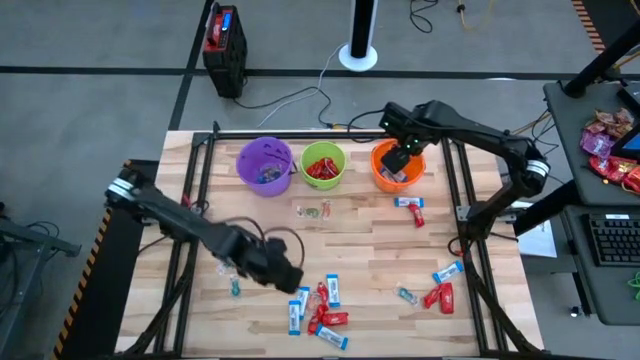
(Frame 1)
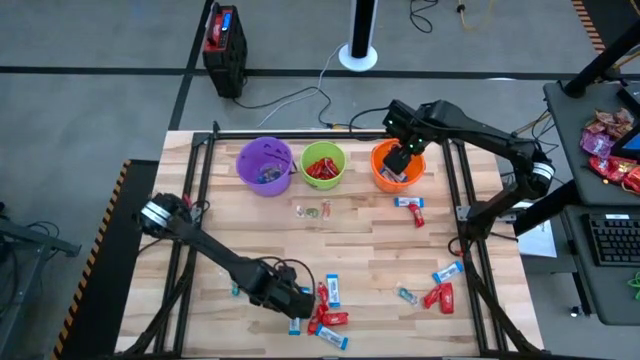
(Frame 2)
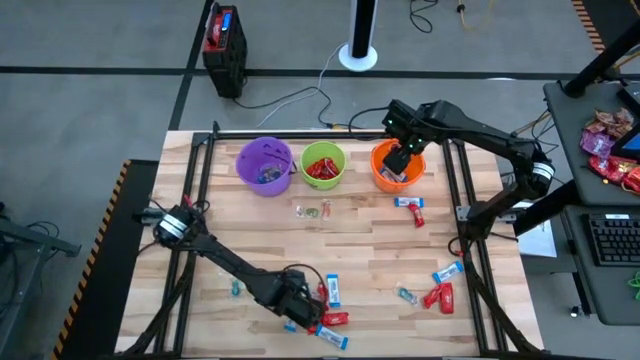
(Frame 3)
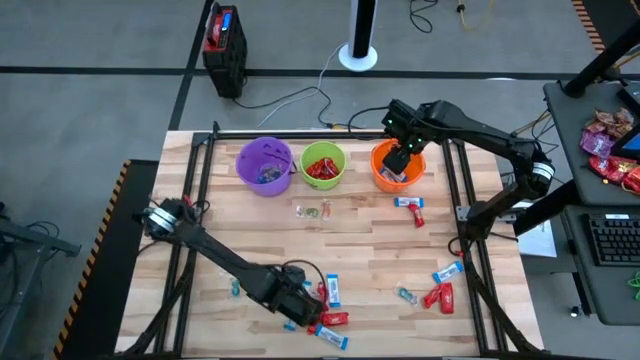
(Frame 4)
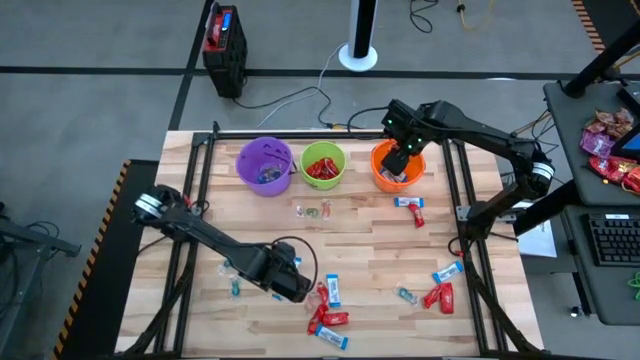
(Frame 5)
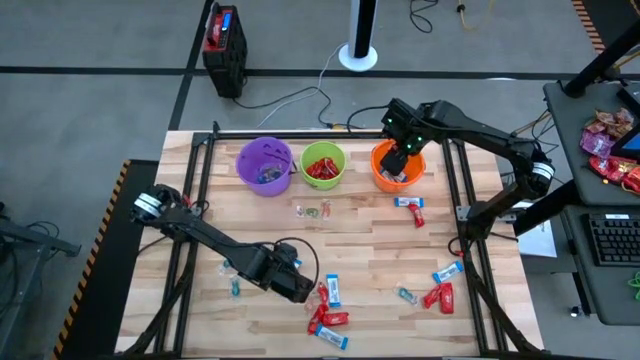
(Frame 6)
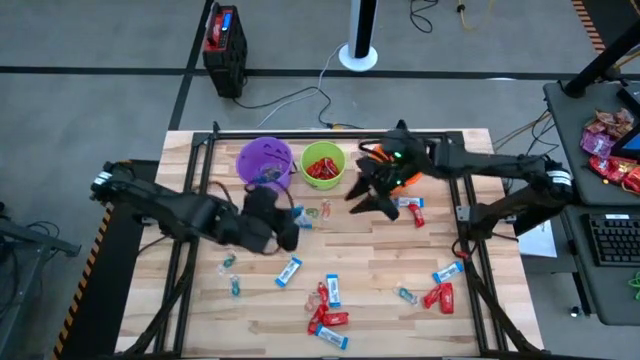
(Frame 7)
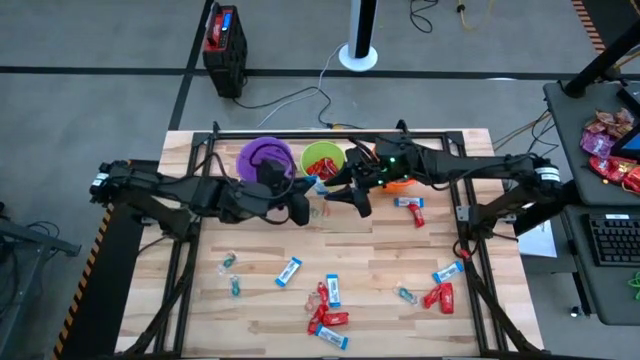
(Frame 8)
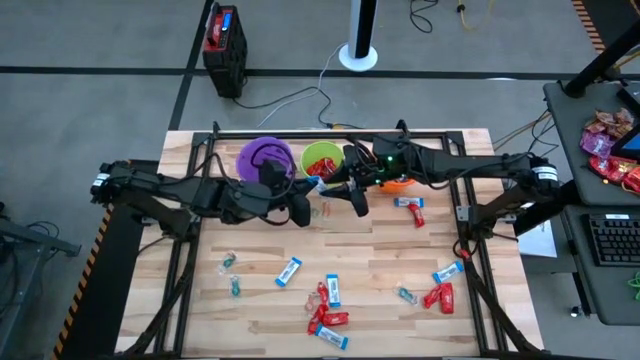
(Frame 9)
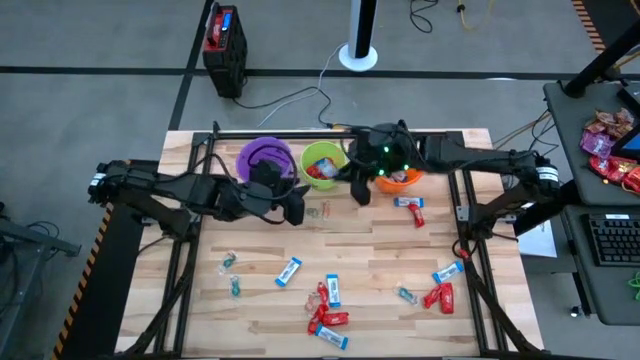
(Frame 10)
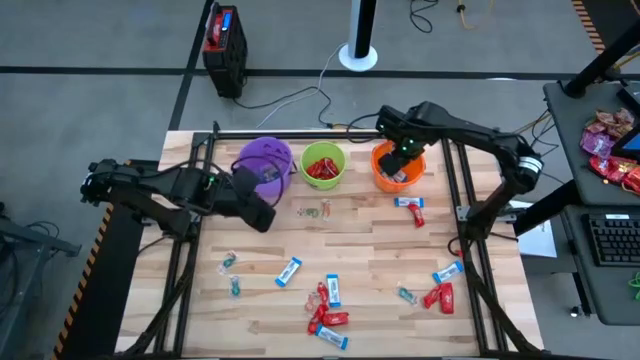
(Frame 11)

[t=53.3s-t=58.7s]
Task: Sort candy by brand, put in halloween buckets
Put the white chocolate bar into the orange bucket

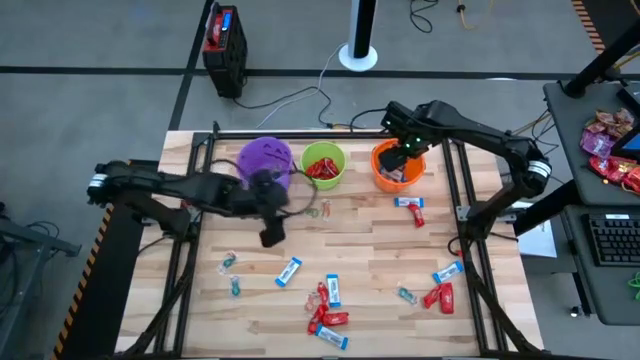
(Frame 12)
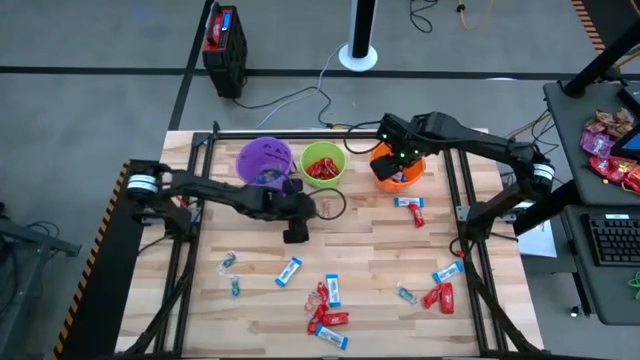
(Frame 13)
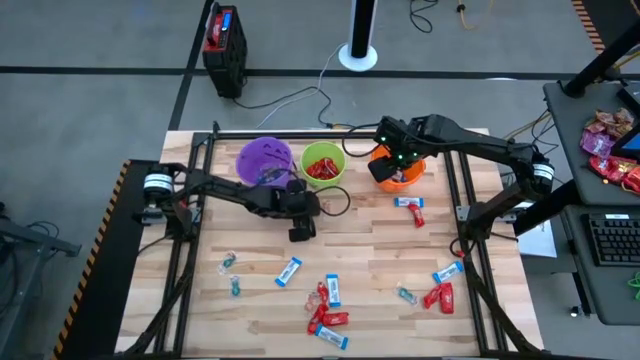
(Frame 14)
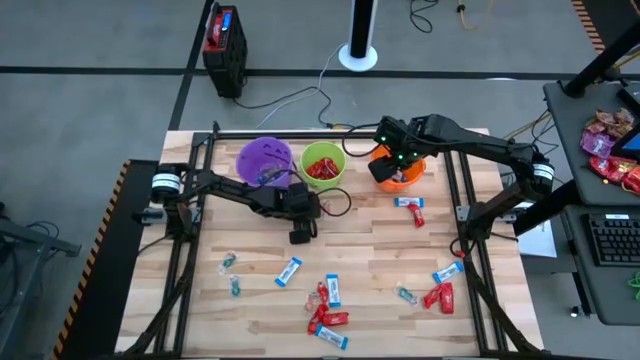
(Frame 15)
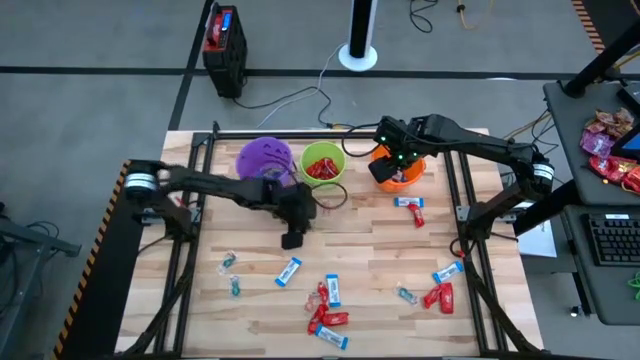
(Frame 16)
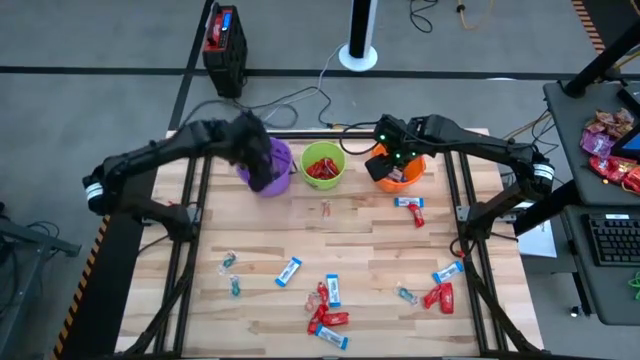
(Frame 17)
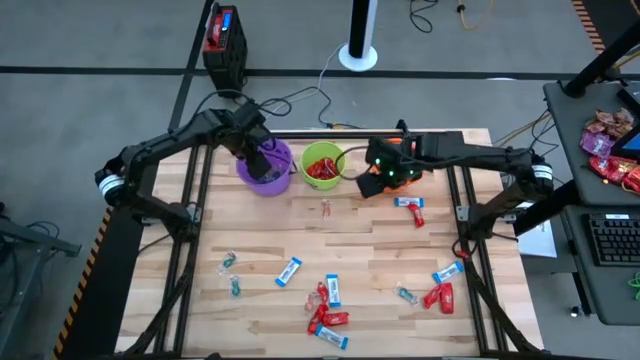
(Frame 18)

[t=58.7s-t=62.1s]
Put the green gummy candy into the purple bucket

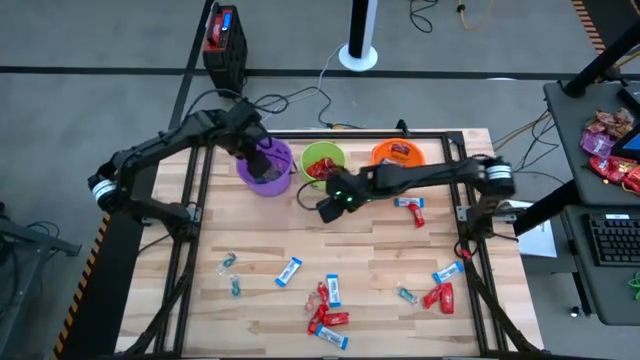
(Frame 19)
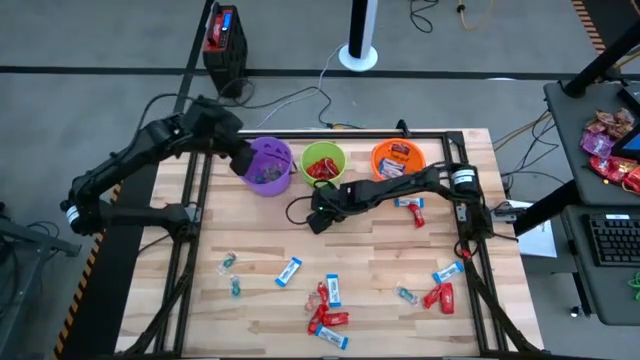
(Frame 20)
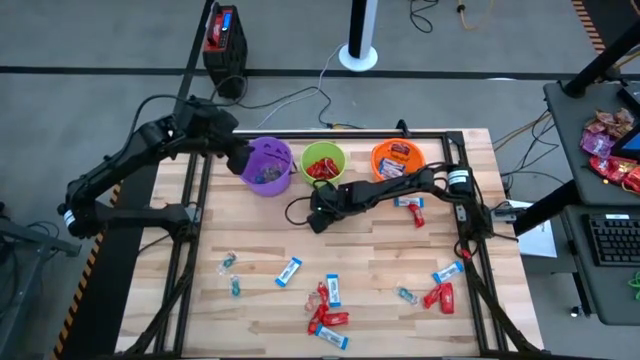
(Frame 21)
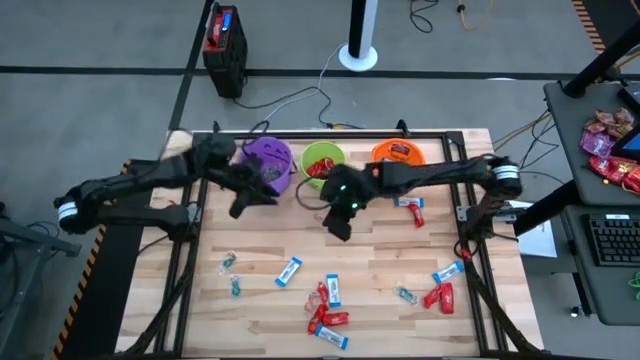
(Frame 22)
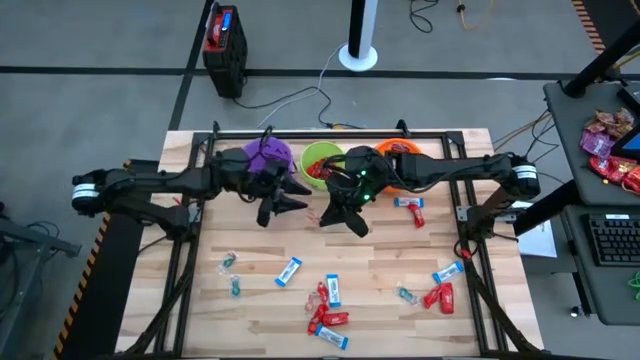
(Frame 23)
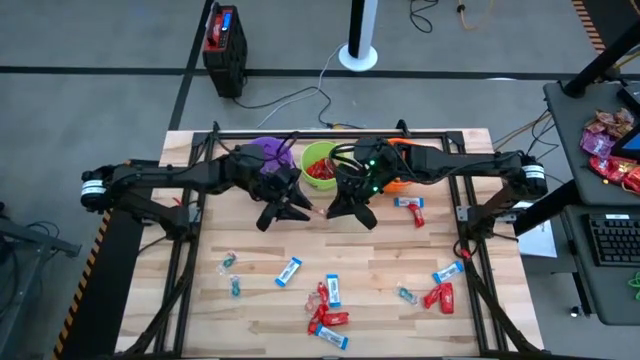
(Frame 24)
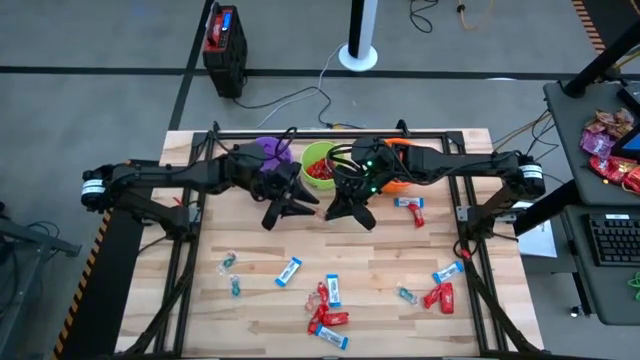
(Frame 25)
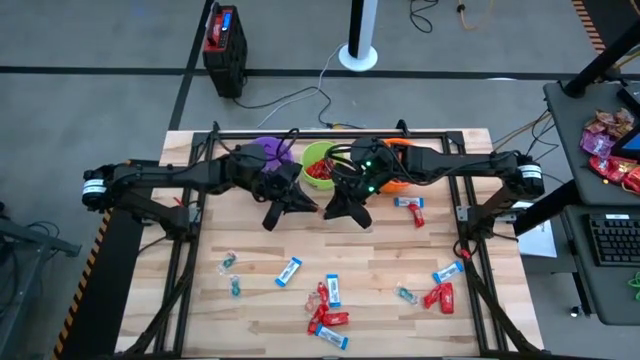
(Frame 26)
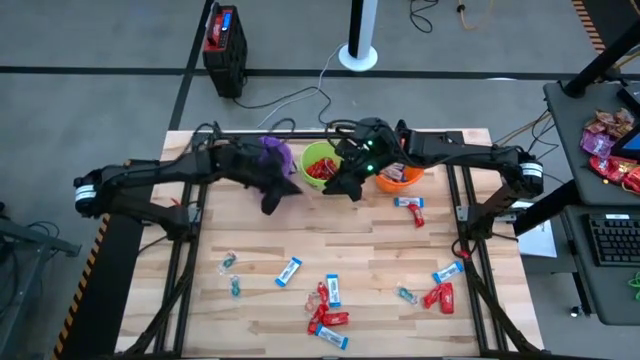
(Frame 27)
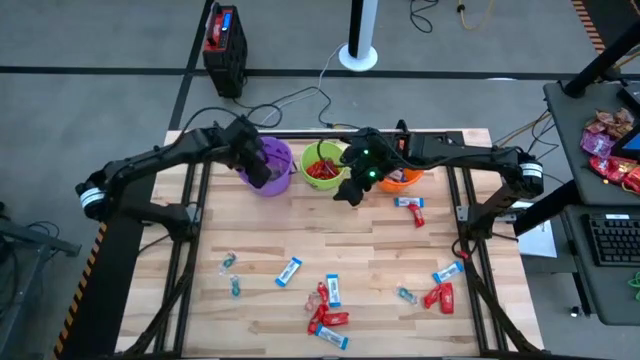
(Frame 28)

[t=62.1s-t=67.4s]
Put the orange gummy candy into the purple bucket

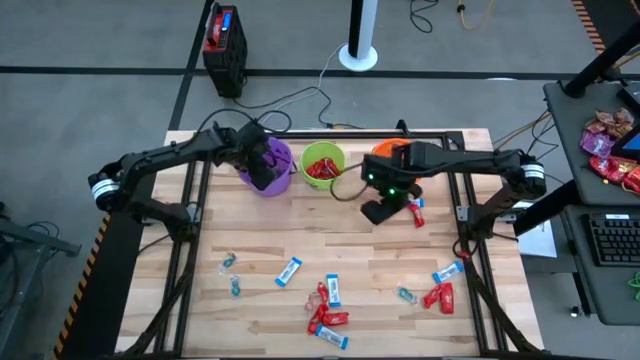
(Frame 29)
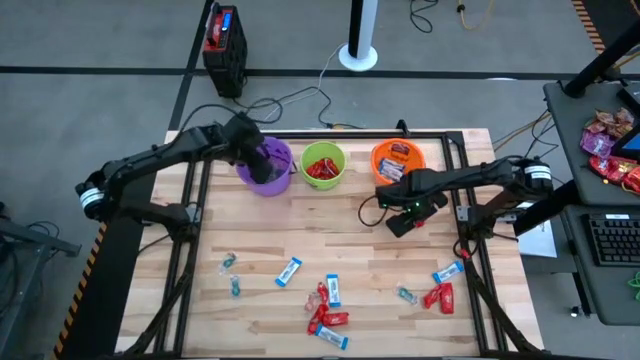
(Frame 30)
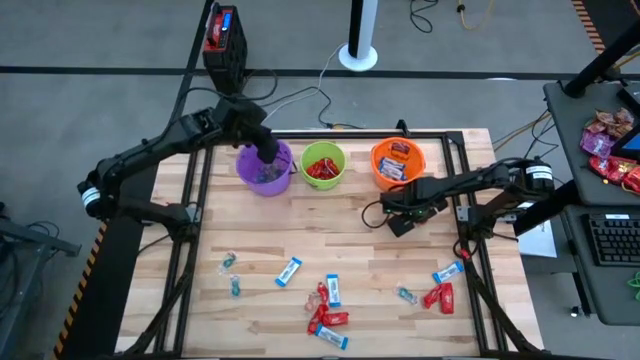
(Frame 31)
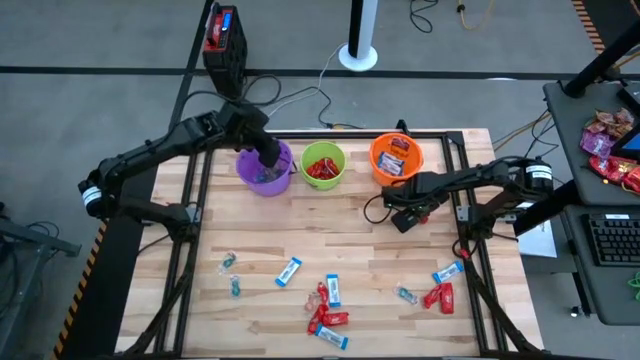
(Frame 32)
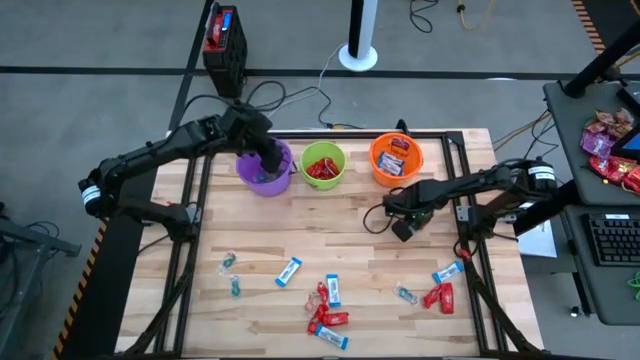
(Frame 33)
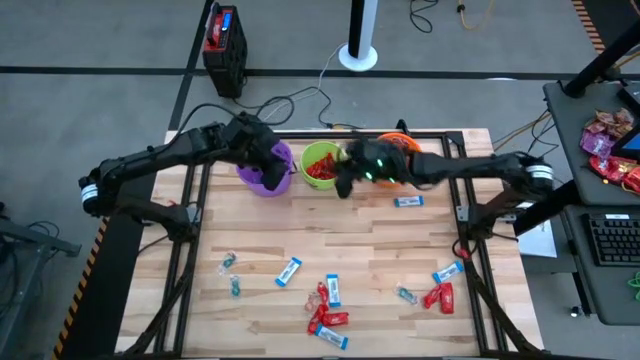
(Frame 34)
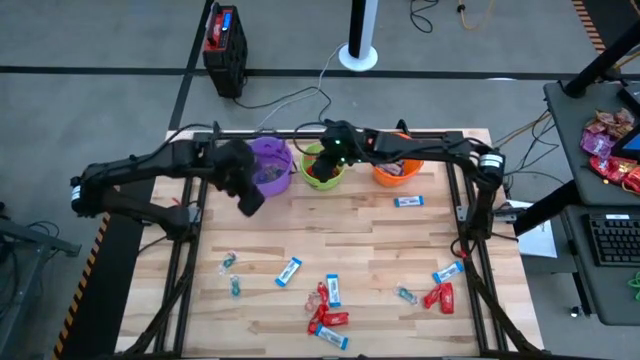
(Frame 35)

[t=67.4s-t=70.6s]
Put the red chocolate bar into the green bucket

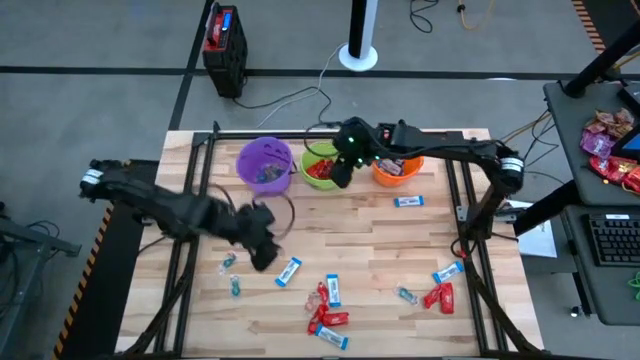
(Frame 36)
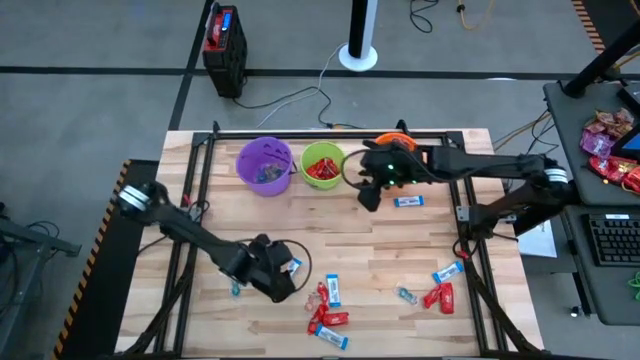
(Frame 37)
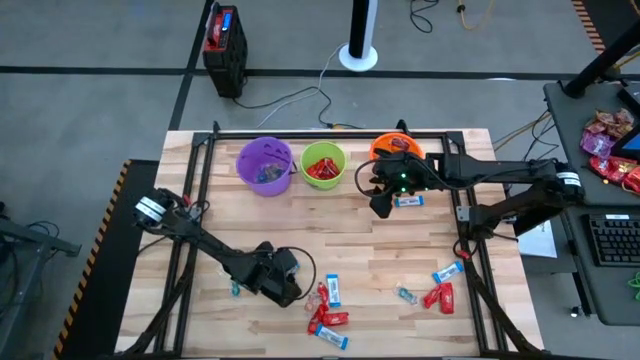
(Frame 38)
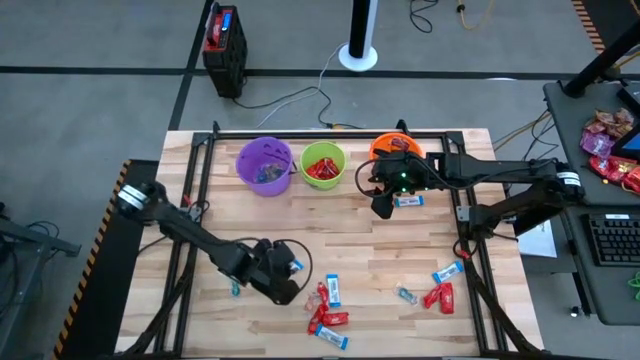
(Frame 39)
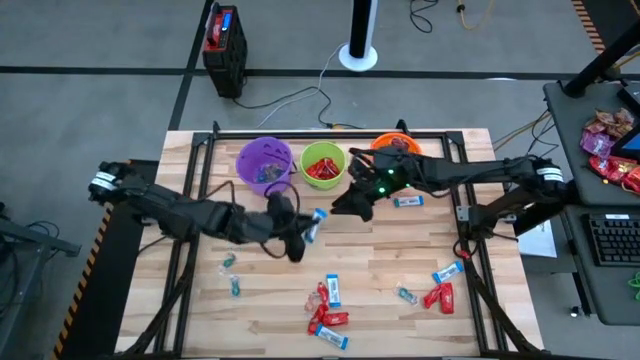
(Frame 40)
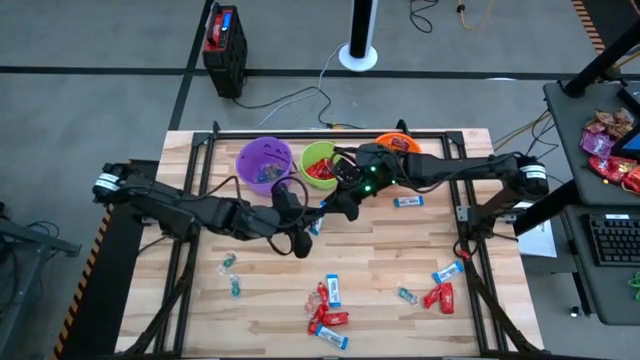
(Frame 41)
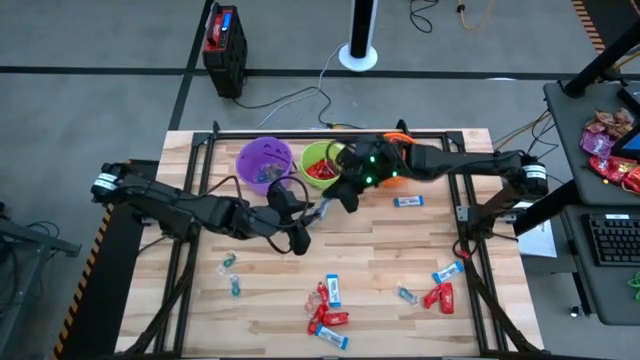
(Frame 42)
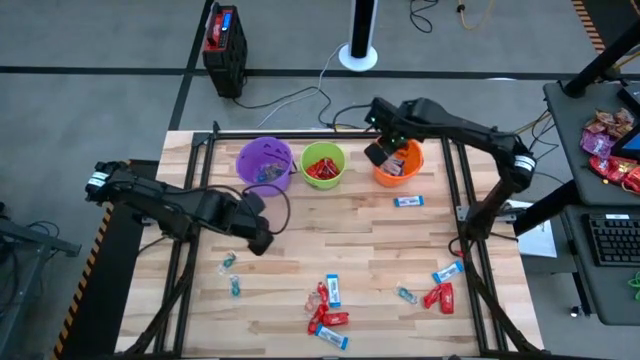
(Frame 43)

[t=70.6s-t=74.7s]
Put the white chocolate bar into the orange bucket

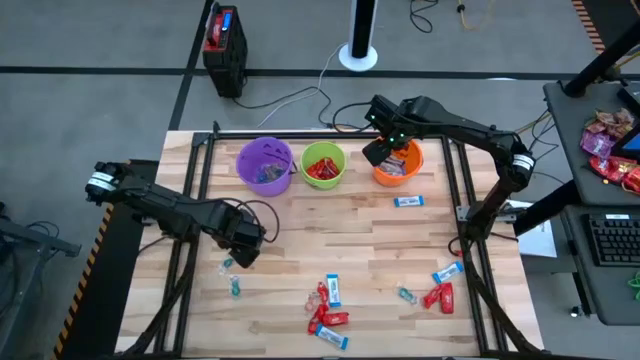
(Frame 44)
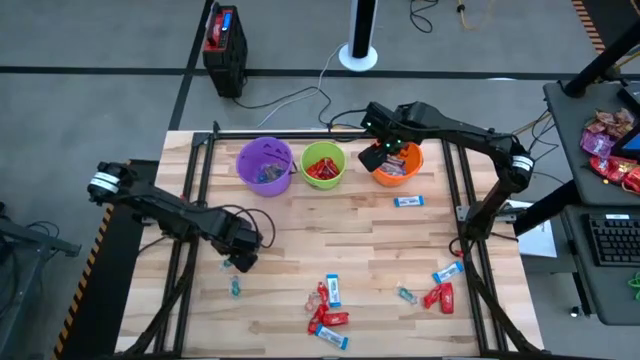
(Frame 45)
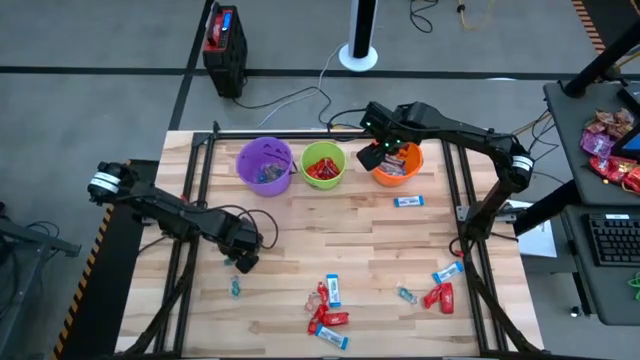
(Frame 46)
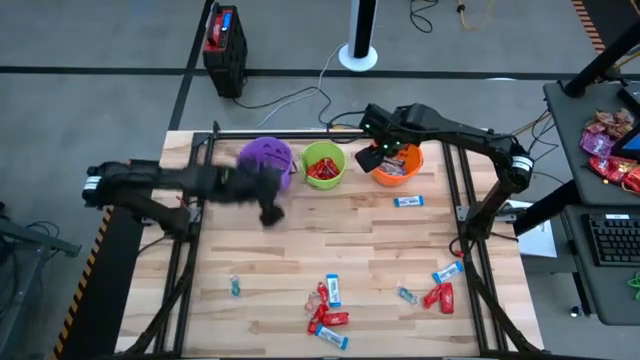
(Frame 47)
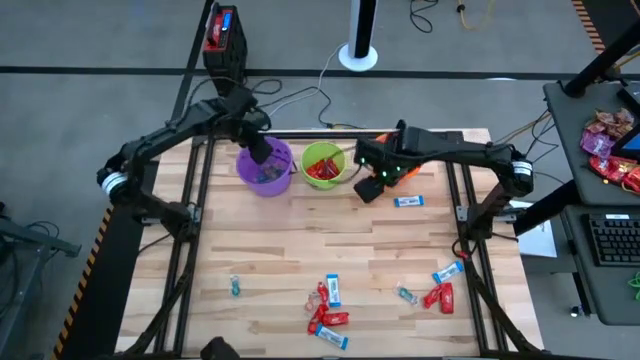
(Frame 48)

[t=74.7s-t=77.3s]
Put the blue gummy candy into the purple bucket
